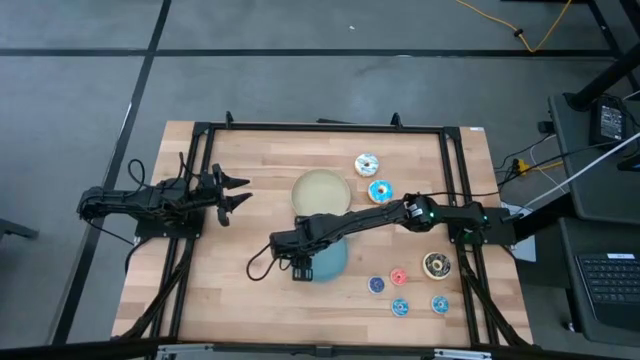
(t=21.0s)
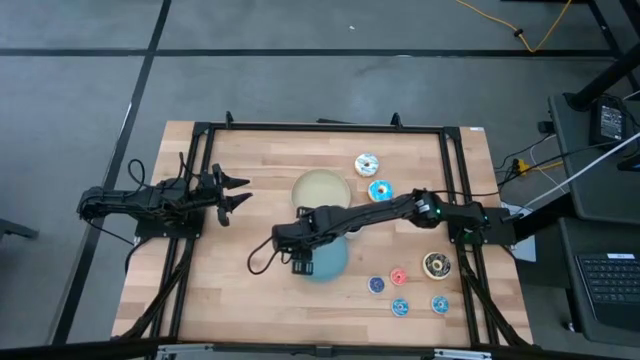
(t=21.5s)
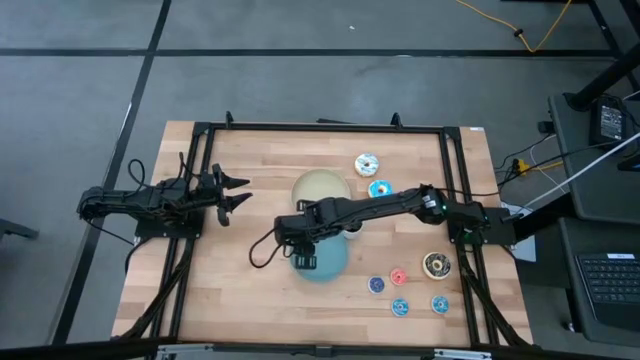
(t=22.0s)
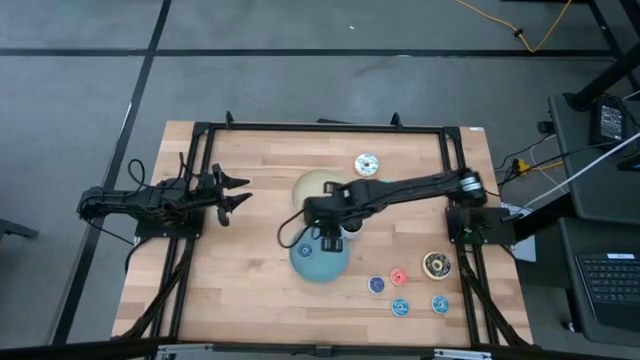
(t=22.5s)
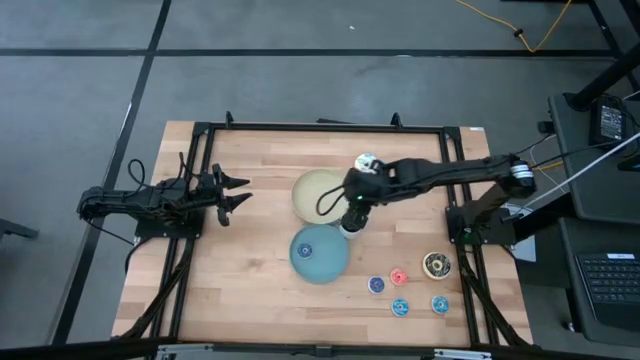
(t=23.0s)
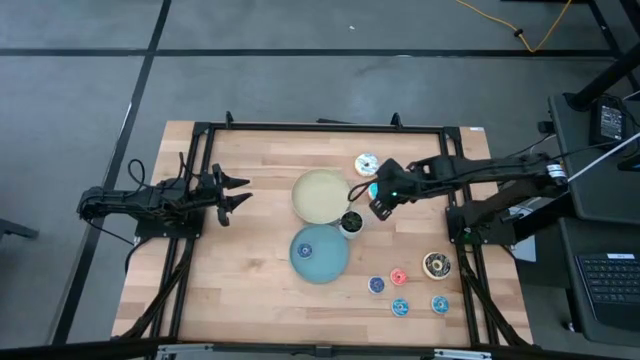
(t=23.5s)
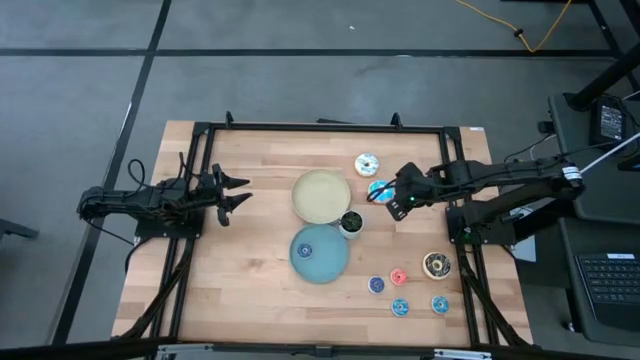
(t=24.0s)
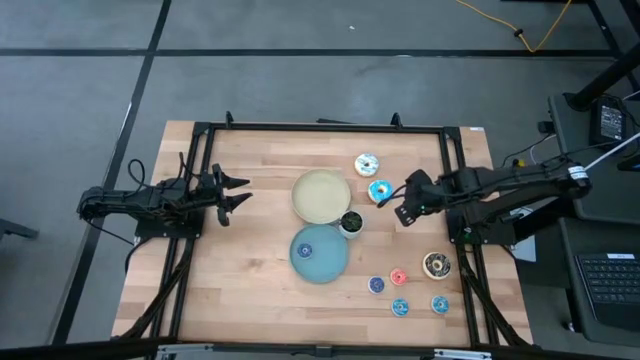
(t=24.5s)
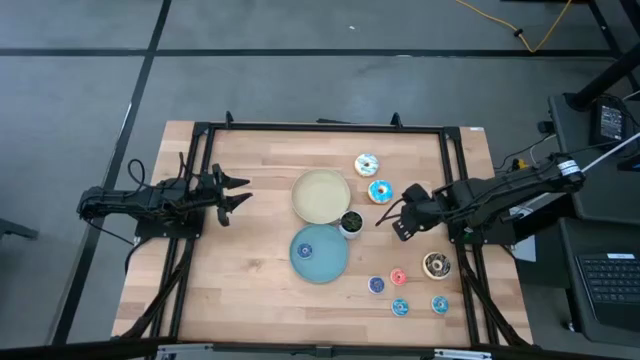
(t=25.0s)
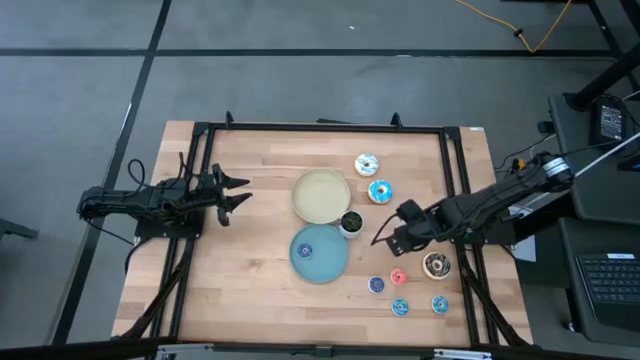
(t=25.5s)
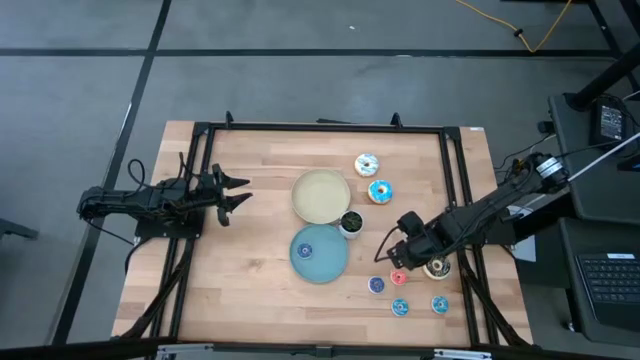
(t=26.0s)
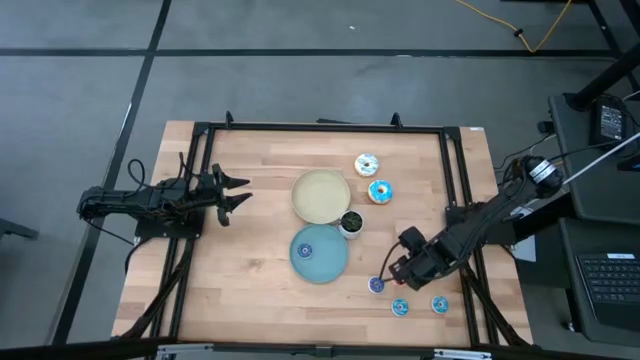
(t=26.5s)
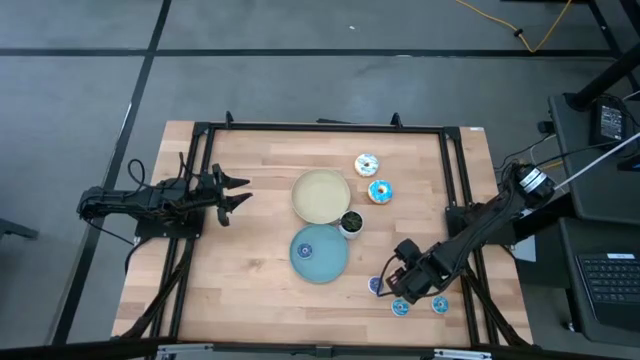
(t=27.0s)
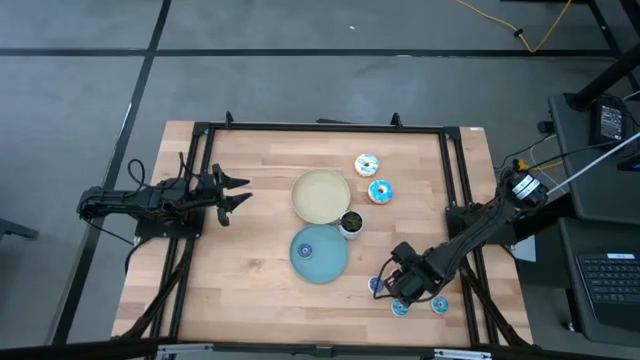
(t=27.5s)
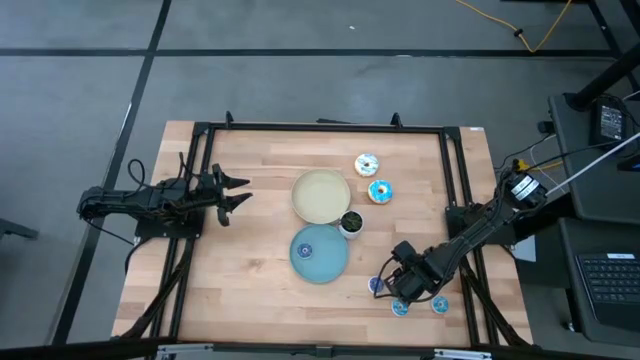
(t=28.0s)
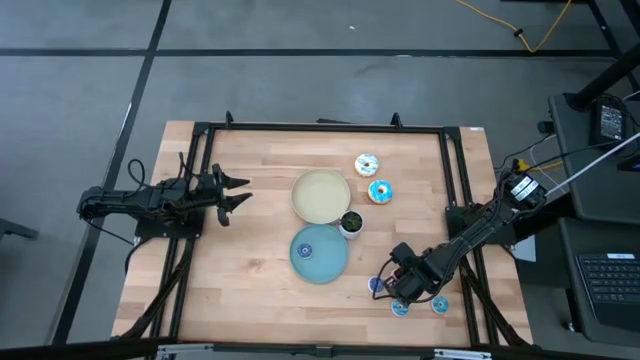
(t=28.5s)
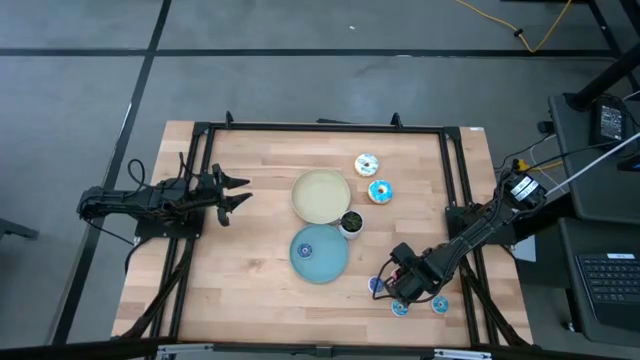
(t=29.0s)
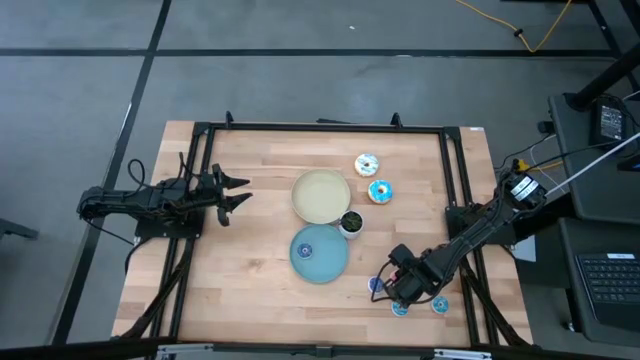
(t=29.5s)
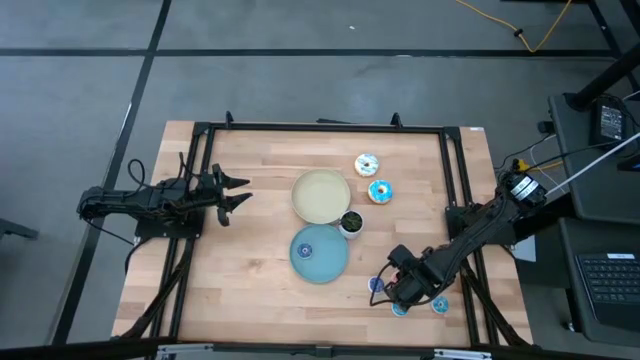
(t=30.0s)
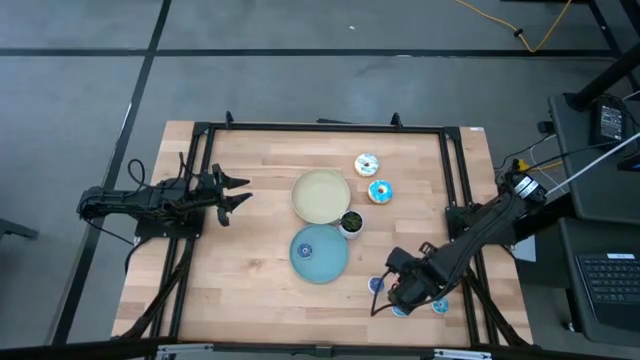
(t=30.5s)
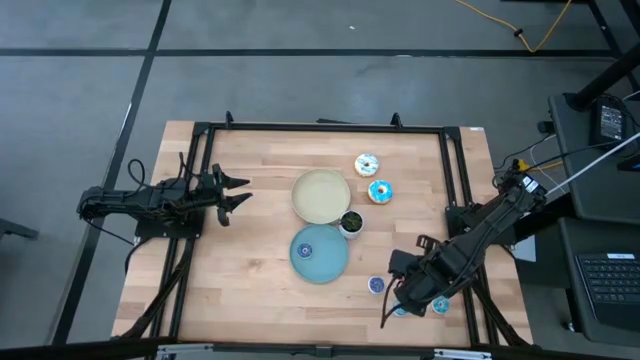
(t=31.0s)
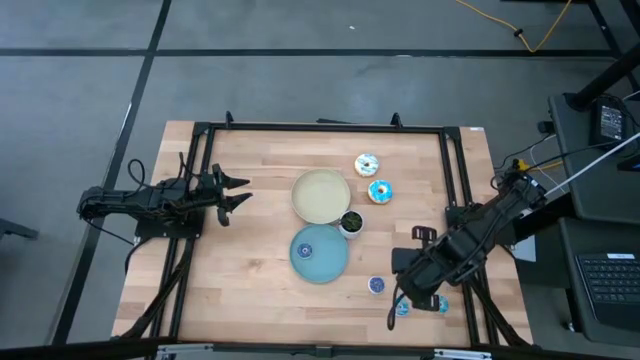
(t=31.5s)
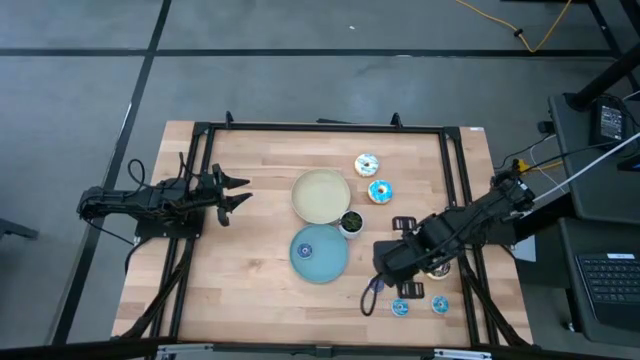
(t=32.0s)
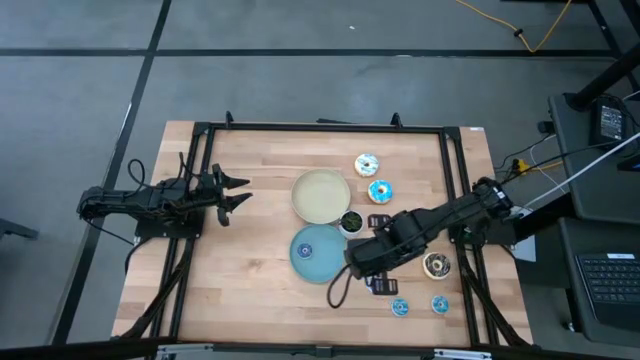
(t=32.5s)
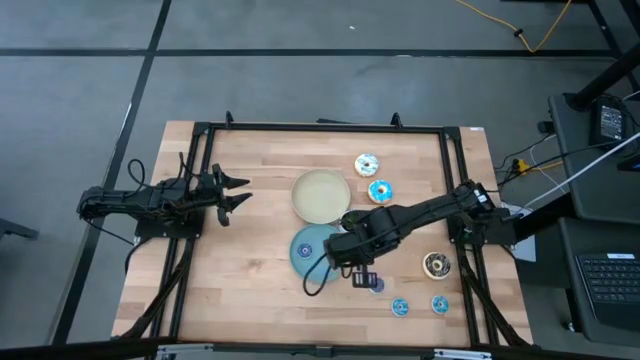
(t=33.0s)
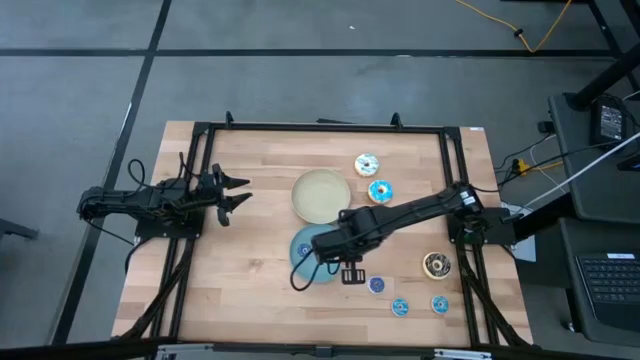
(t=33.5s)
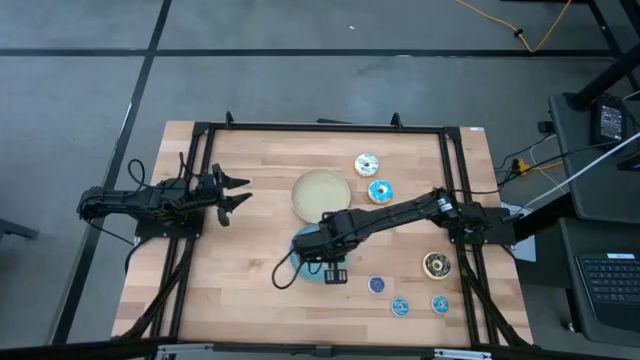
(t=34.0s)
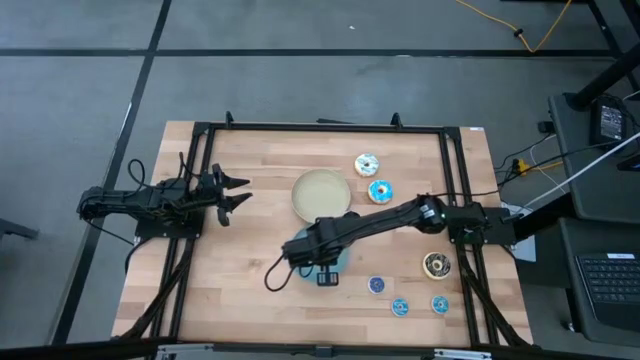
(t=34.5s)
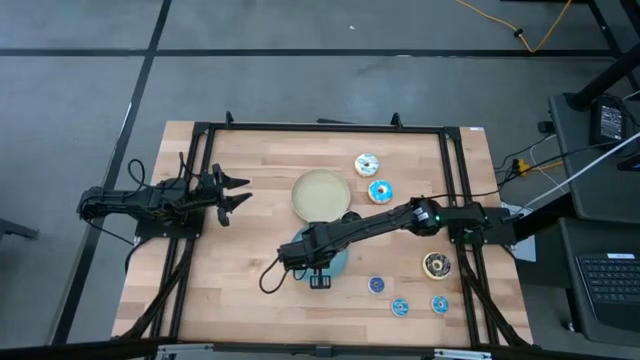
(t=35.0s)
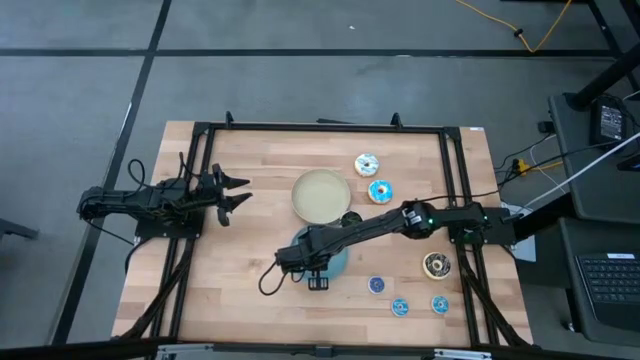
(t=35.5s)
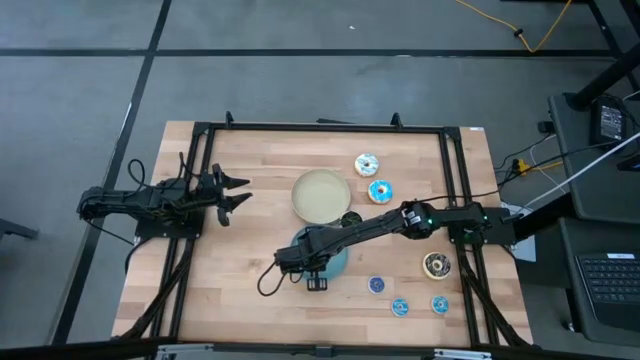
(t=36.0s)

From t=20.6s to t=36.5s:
Task: Pick & Place donuts
Put the small pink donut on the blue plate

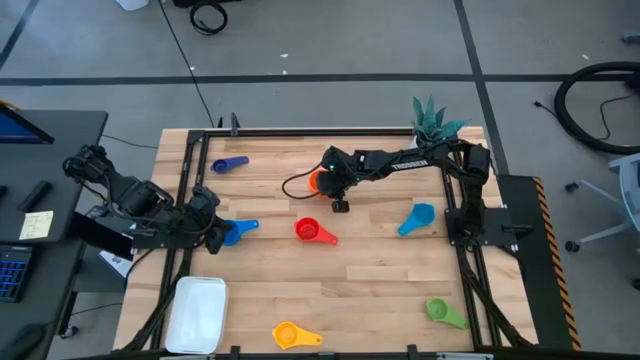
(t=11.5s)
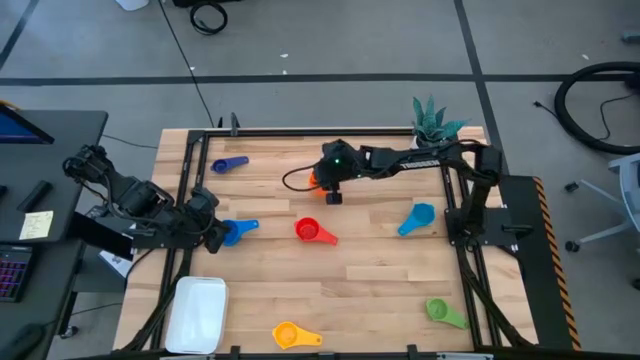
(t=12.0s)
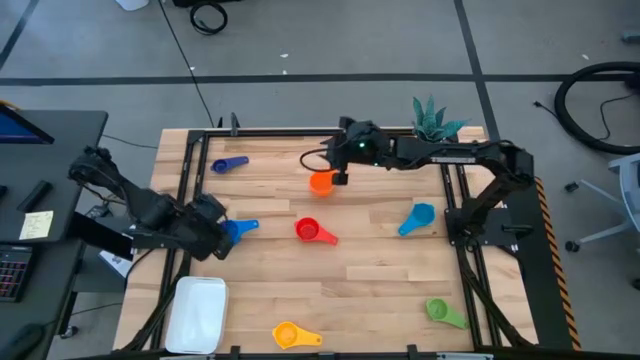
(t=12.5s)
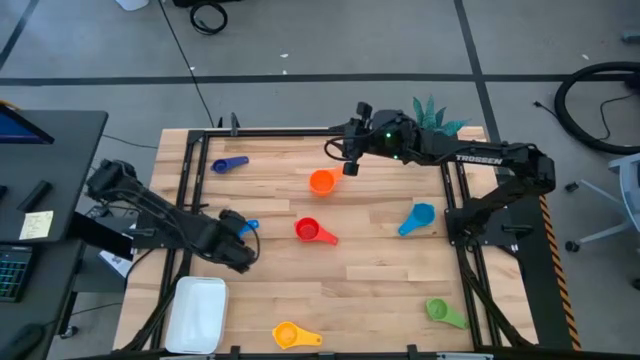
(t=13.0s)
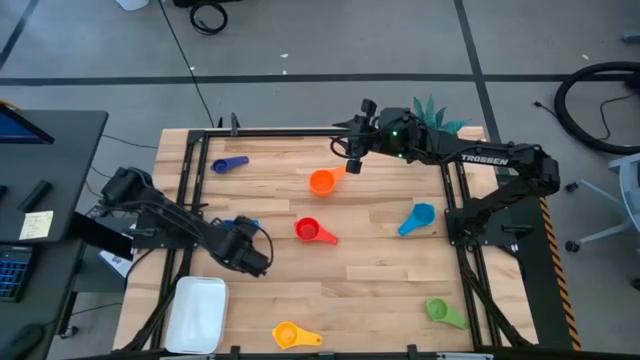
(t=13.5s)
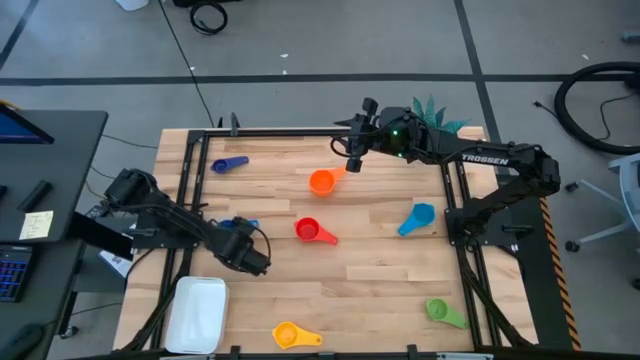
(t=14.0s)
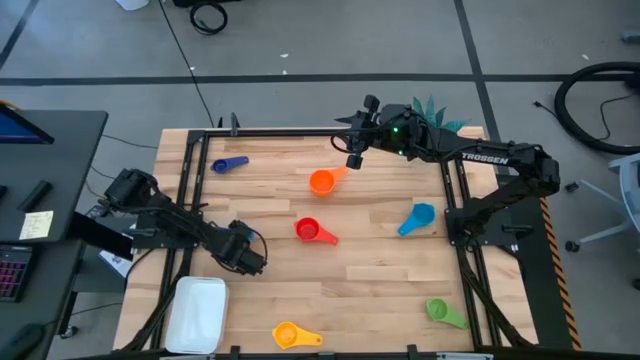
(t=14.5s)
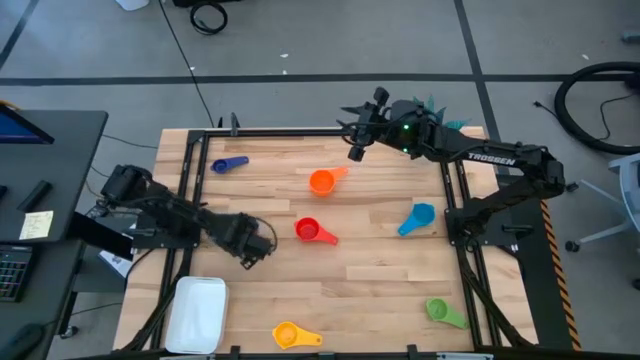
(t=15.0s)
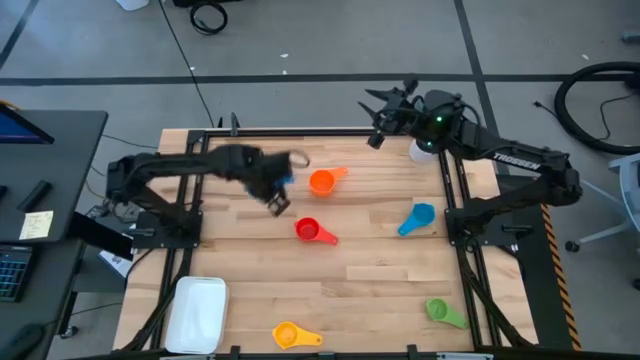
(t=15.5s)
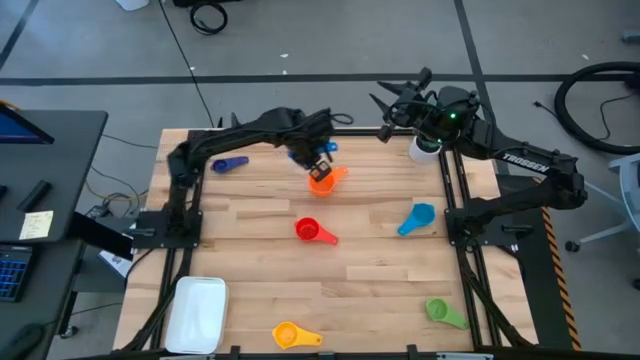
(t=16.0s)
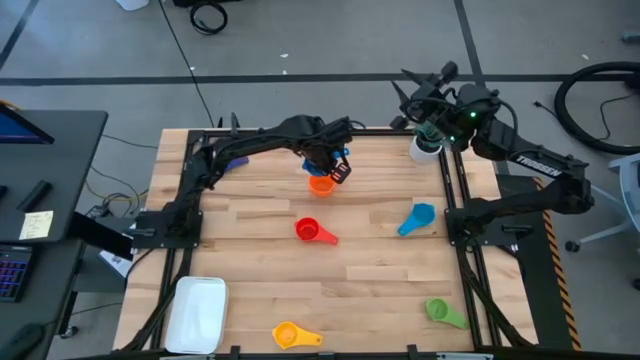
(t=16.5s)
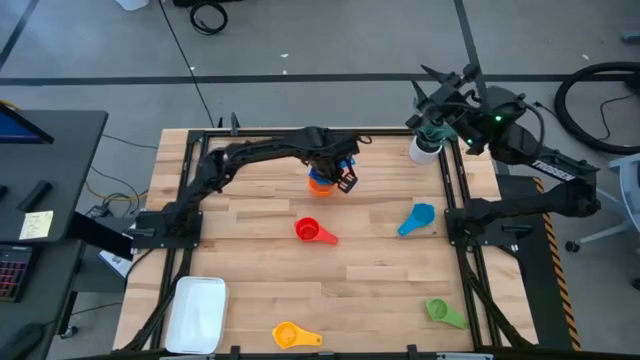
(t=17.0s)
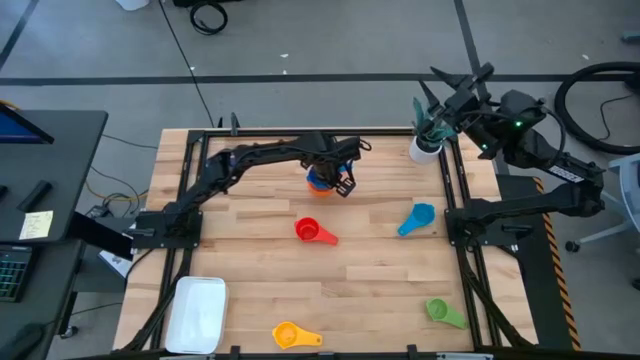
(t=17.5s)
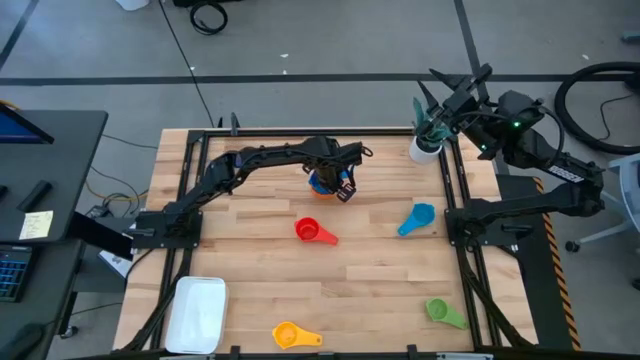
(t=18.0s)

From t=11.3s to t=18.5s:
Task: Nest measuring cups in basket
Stack the dark blue measuring cup on top of the orange measuring cup
